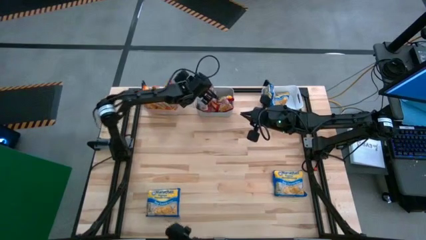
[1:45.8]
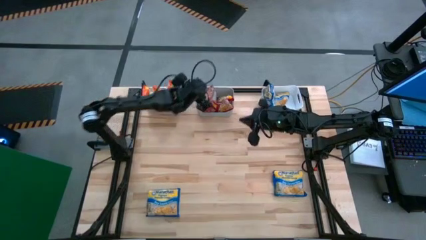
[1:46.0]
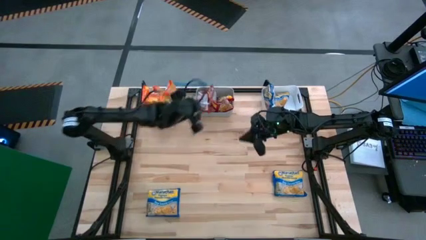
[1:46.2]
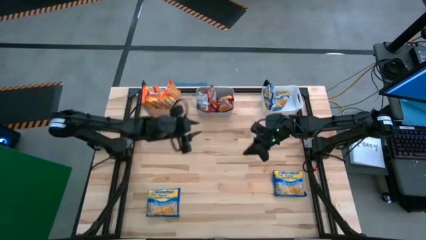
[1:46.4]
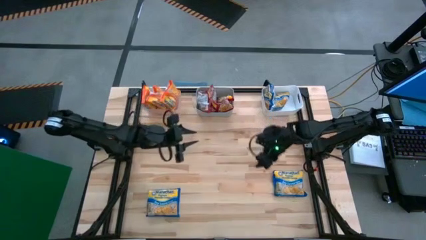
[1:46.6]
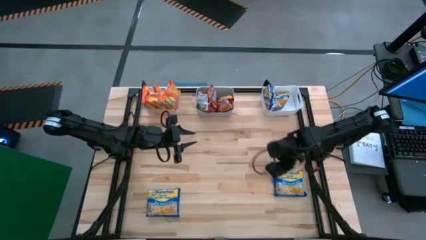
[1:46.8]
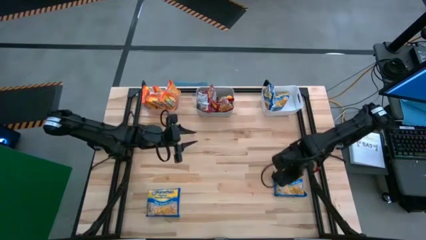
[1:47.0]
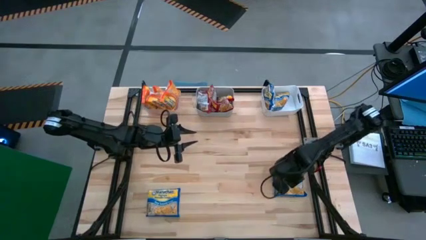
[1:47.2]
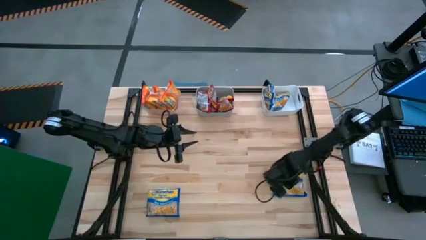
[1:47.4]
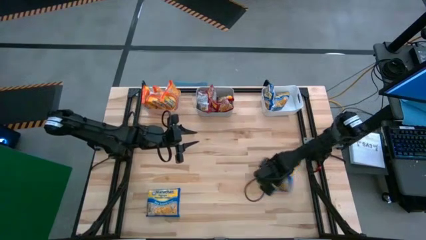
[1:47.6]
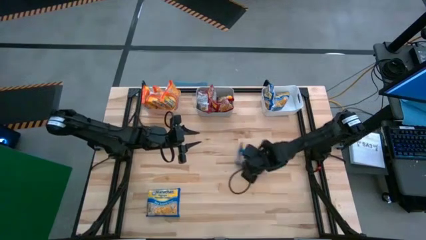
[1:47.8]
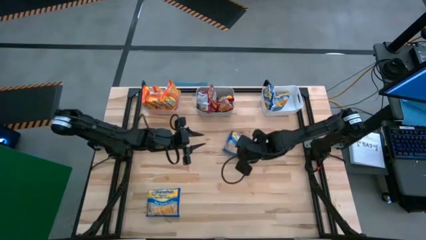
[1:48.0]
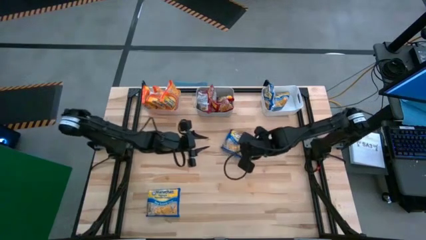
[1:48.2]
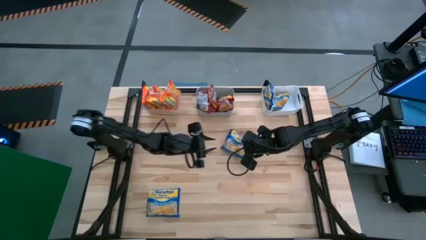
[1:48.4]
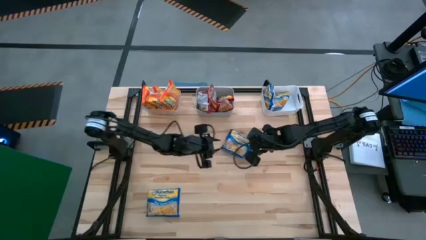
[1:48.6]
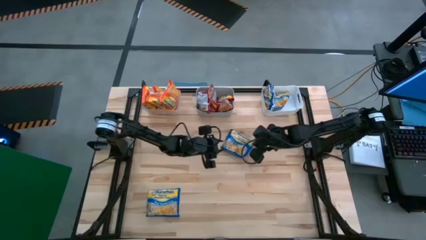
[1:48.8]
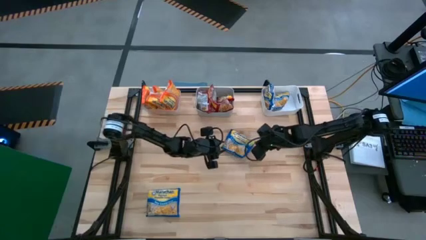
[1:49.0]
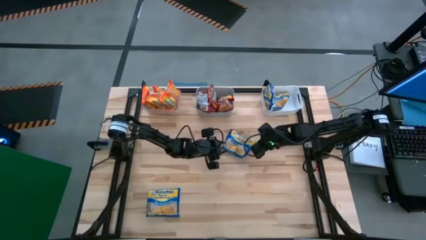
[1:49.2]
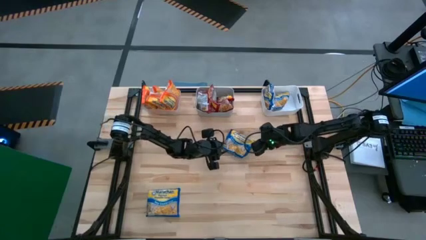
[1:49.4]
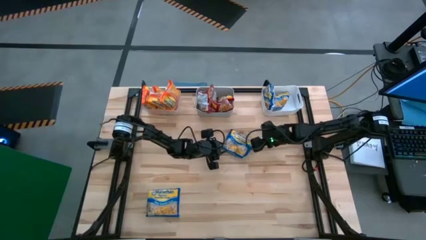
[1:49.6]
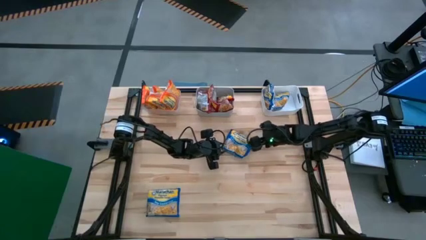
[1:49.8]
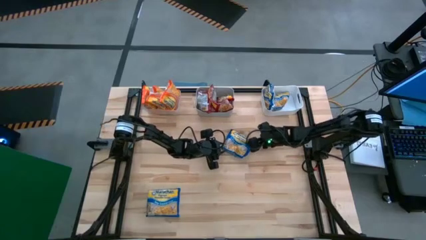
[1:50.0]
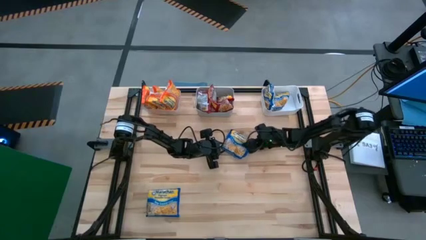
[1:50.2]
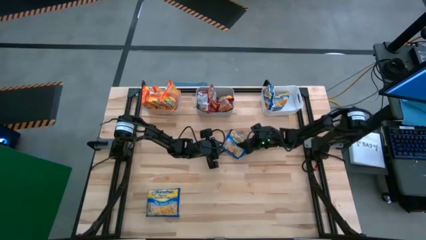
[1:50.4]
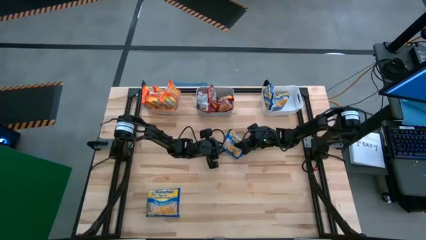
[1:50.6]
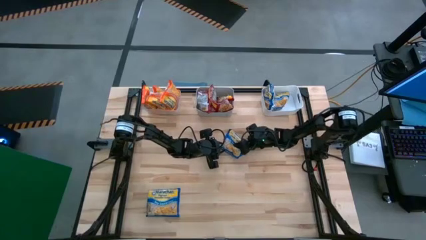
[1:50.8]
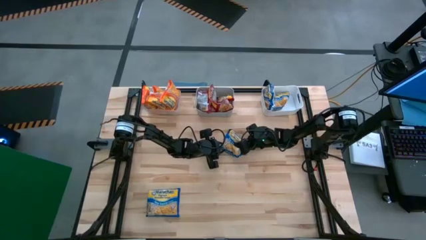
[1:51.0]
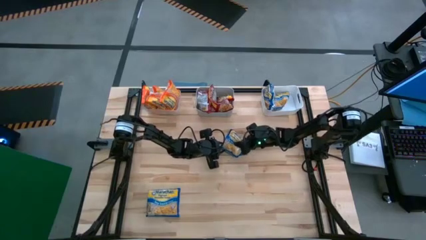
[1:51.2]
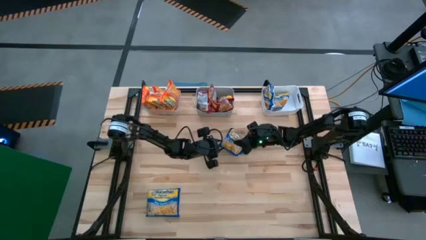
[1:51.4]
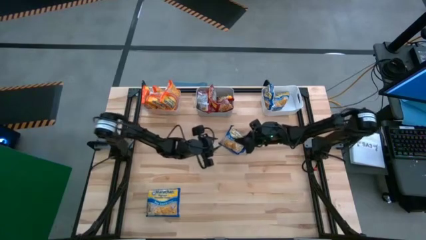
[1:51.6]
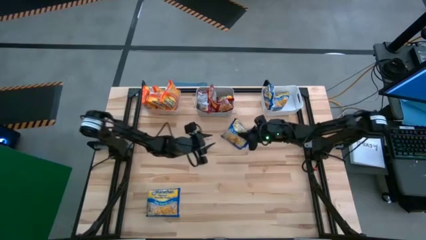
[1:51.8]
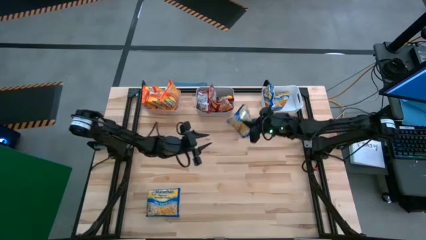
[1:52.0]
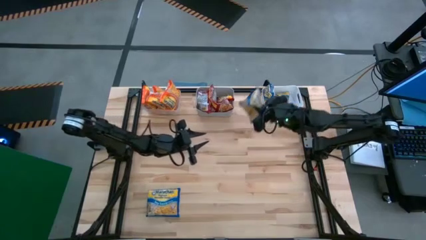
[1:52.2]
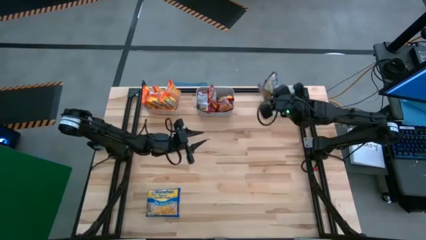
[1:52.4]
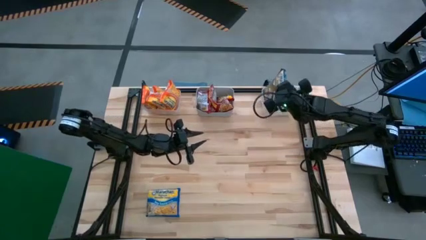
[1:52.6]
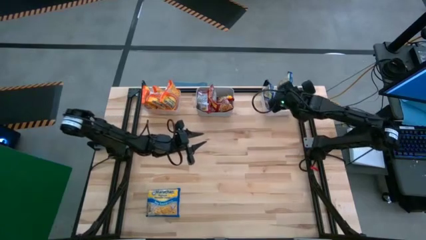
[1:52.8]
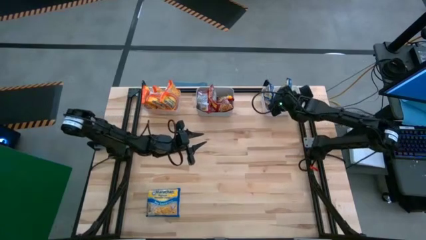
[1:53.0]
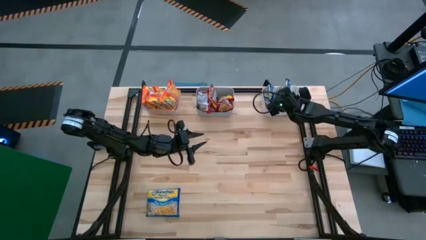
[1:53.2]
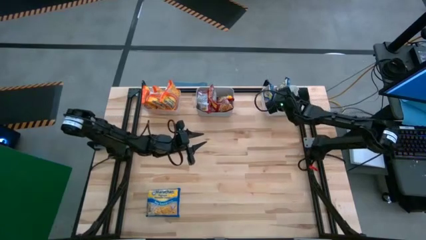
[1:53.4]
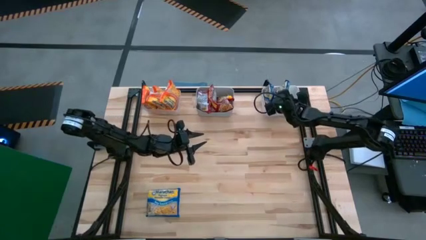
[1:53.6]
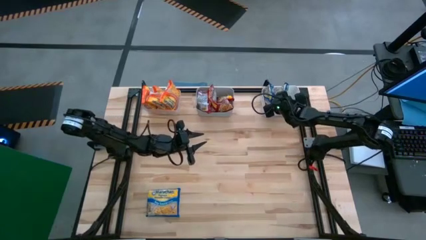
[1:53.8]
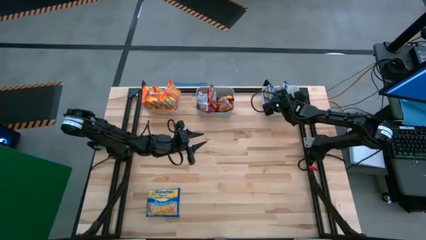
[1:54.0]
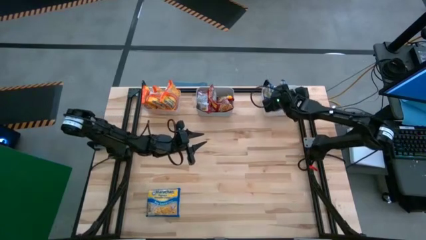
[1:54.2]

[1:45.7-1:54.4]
Task: Sort Maruchan noodles
Put the blue noodle pack into the white bin

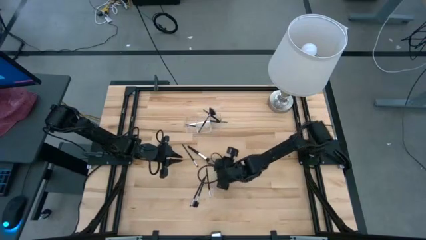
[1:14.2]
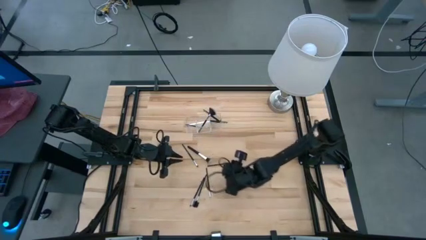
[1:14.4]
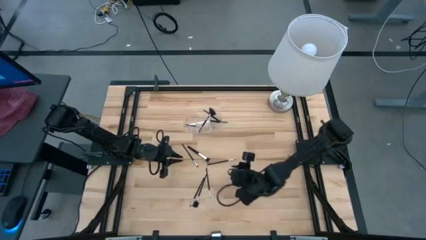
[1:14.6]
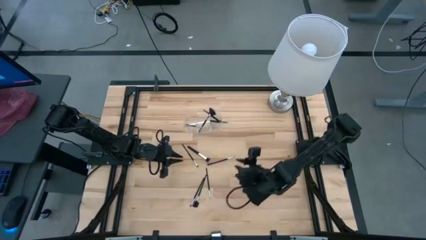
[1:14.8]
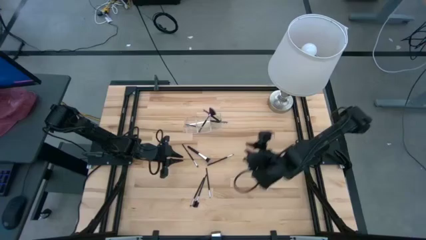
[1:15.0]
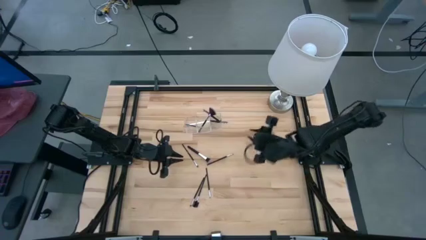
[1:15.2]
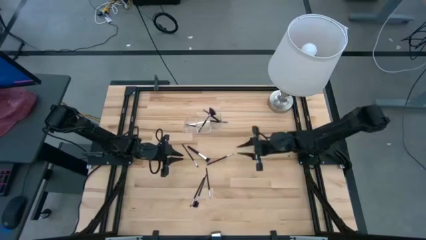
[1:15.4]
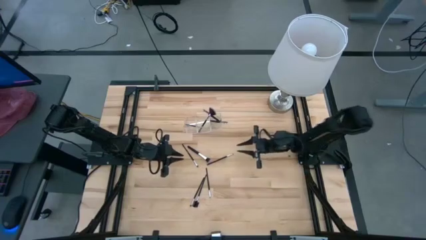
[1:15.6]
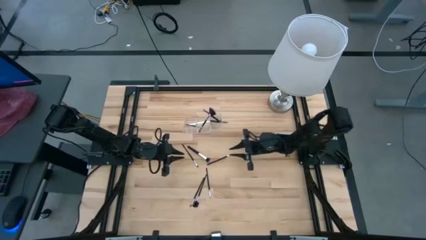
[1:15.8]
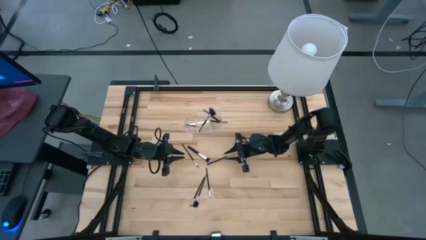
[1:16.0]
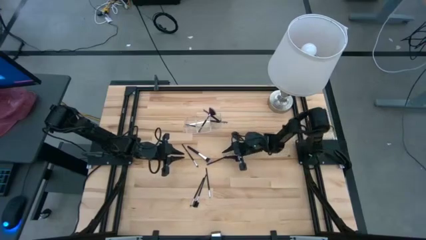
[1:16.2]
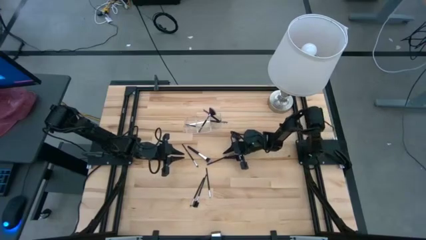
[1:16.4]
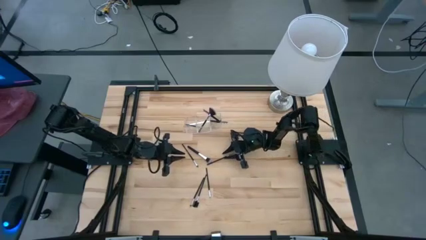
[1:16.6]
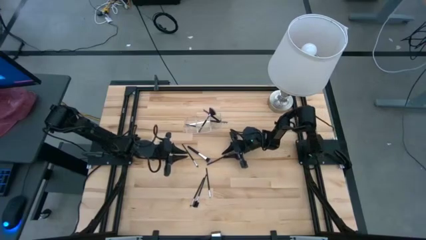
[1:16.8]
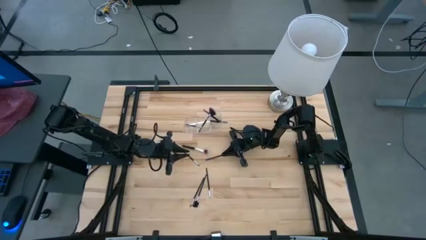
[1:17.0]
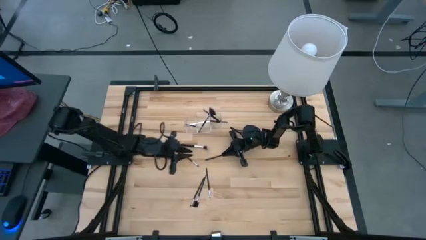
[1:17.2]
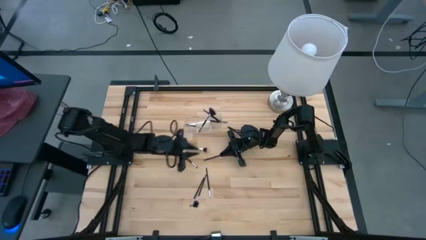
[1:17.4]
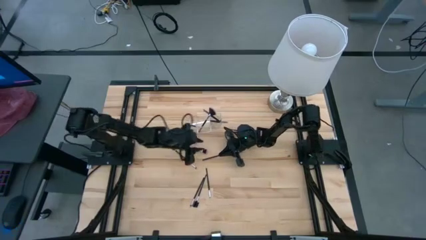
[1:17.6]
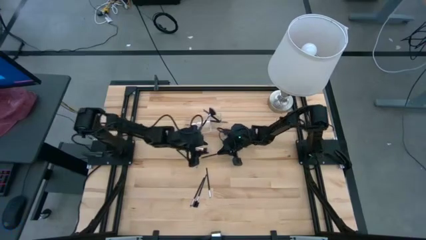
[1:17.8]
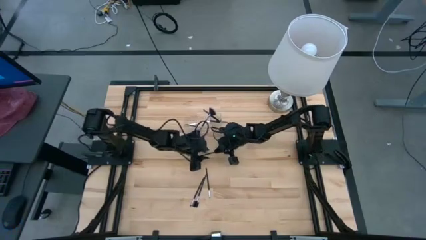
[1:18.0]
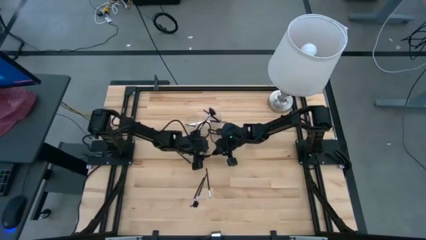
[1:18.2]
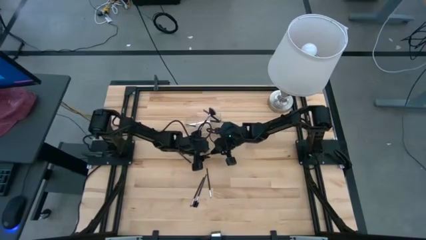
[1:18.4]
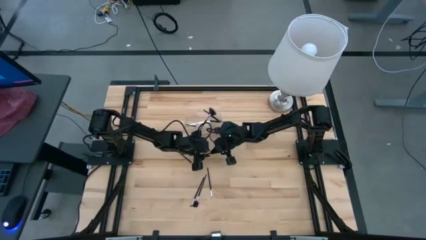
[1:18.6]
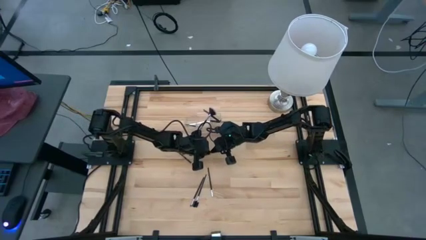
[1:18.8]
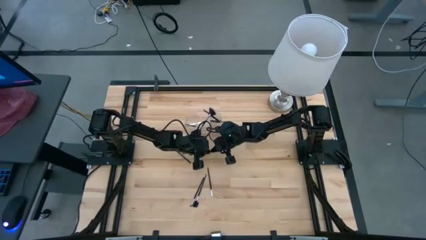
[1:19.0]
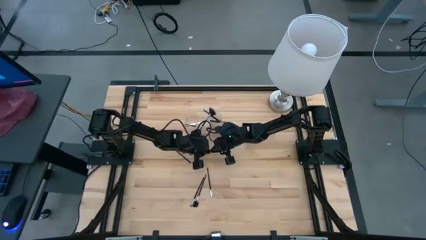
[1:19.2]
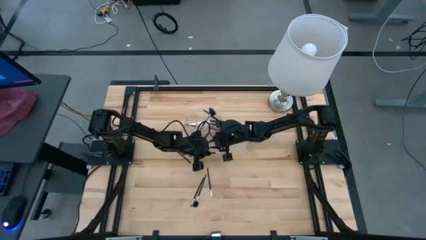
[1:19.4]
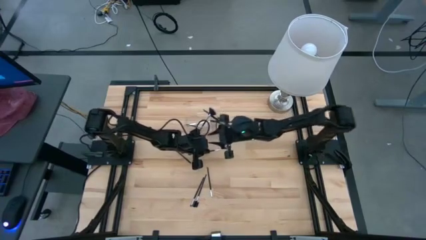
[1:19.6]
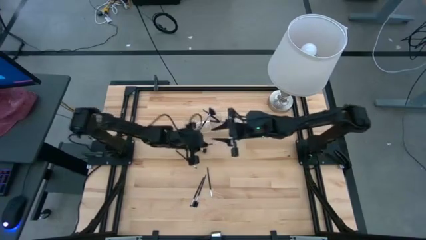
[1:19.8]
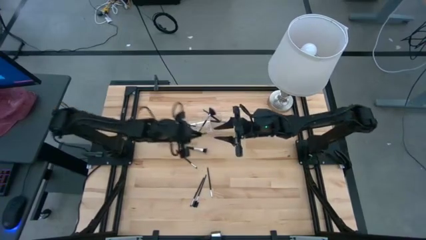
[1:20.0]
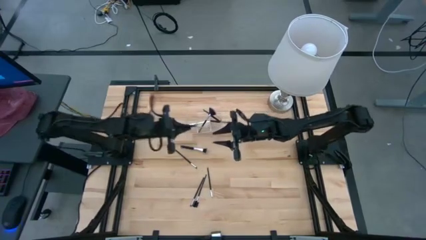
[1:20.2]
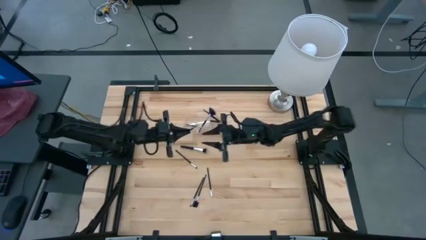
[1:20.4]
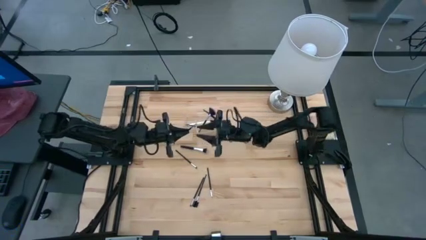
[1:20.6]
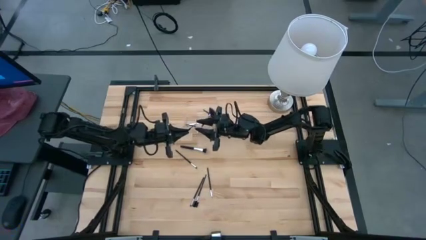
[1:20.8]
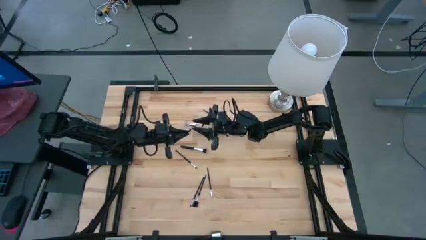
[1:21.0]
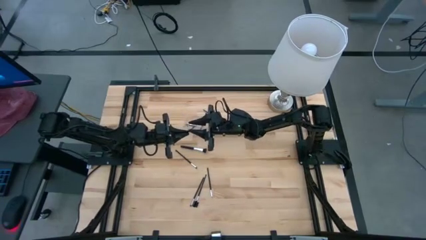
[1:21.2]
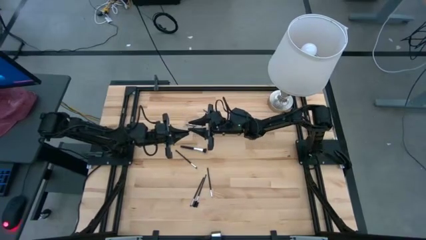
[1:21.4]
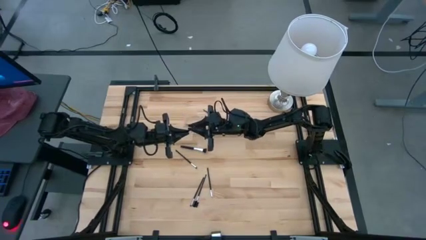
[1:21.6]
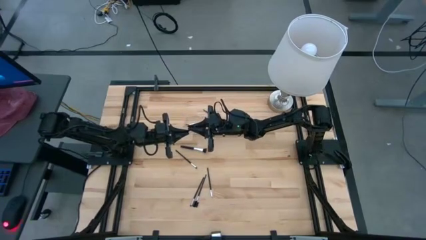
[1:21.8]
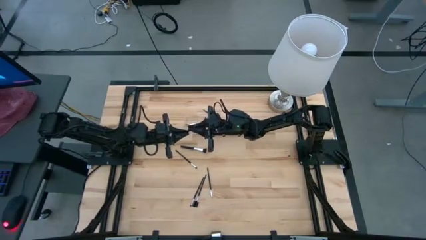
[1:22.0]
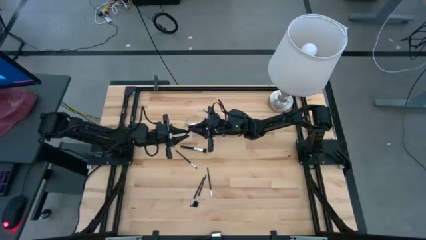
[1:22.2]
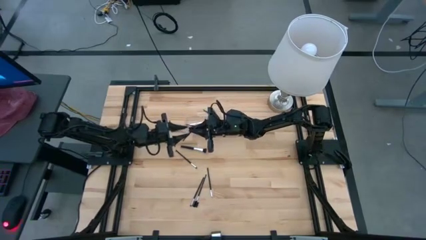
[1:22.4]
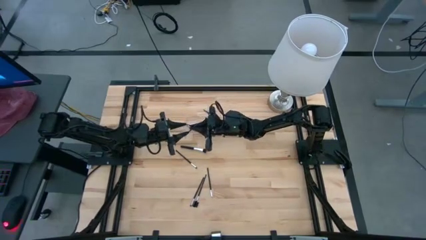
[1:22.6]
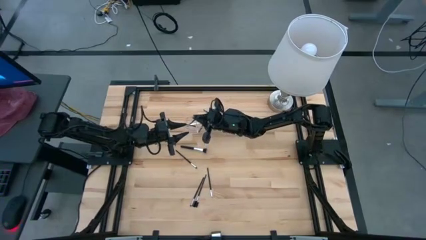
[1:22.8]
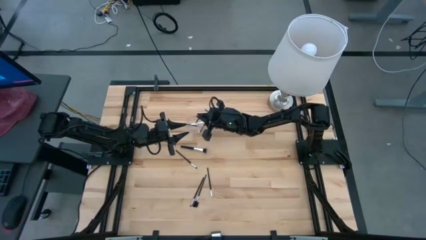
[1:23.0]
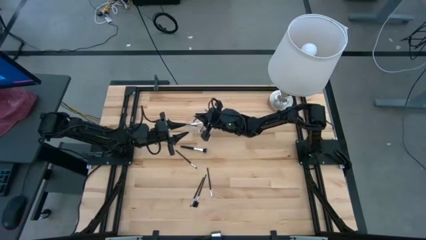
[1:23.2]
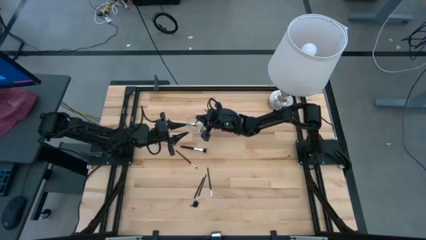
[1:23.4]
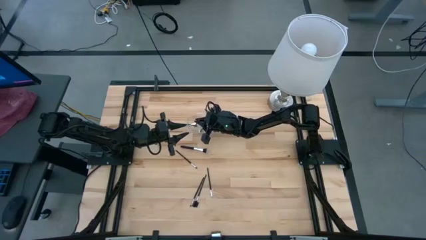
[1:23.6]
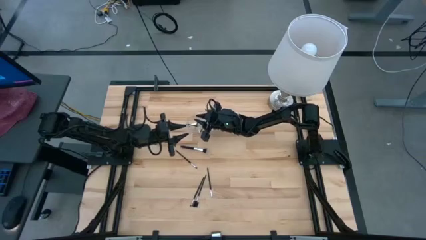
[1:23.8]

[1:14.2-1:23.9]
Task: Put items in baskets/containers
Put the black eyeshadow brush into the transparent organizer
